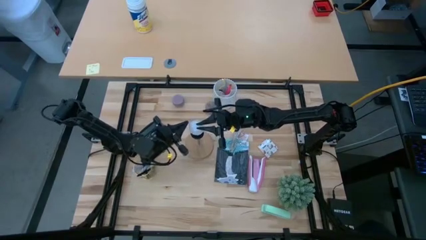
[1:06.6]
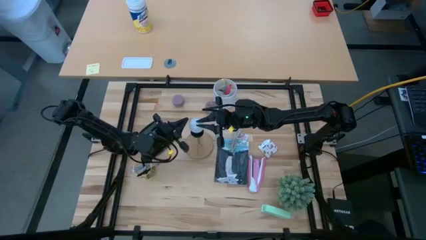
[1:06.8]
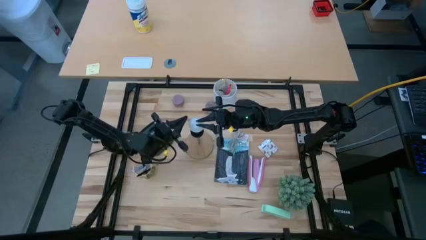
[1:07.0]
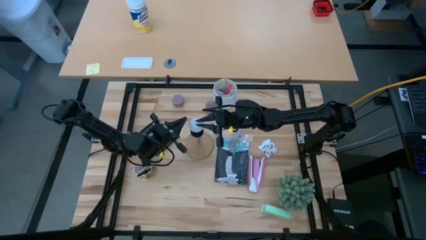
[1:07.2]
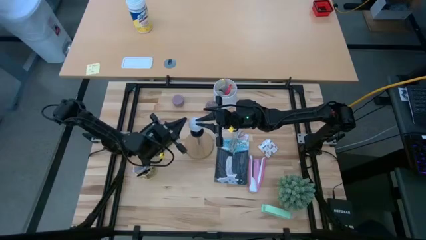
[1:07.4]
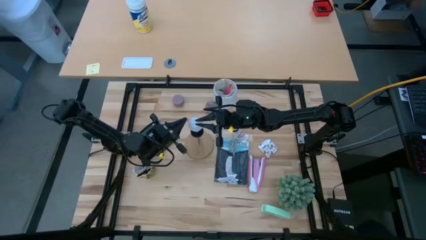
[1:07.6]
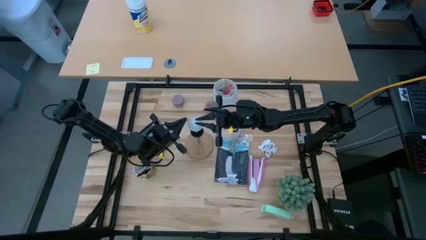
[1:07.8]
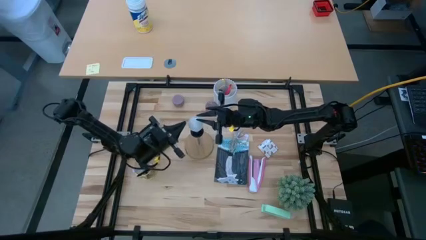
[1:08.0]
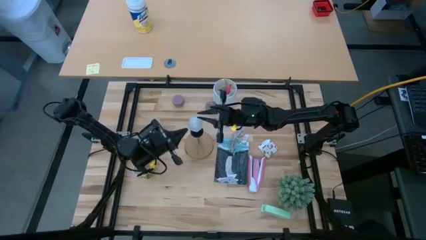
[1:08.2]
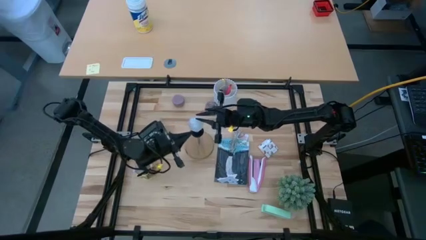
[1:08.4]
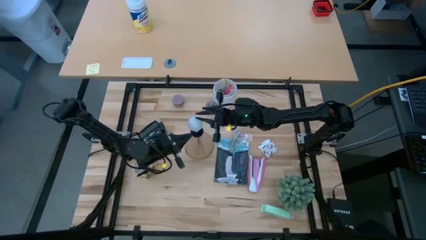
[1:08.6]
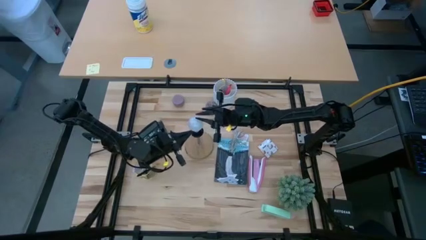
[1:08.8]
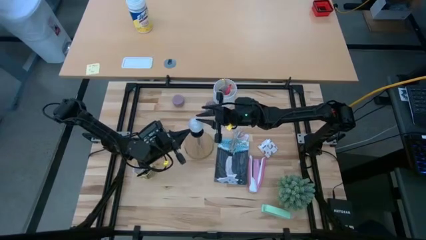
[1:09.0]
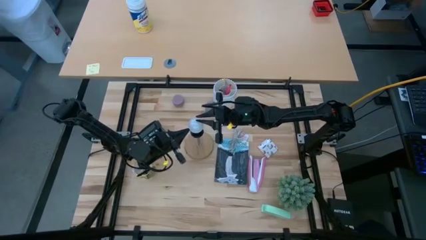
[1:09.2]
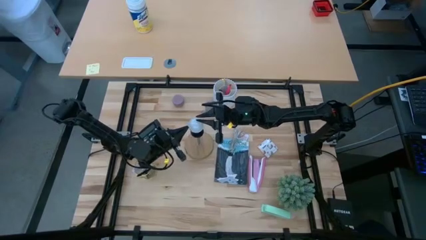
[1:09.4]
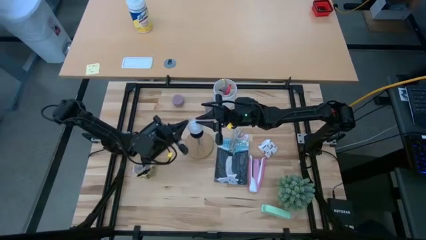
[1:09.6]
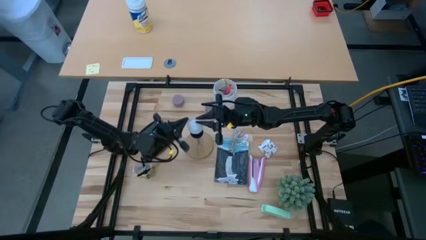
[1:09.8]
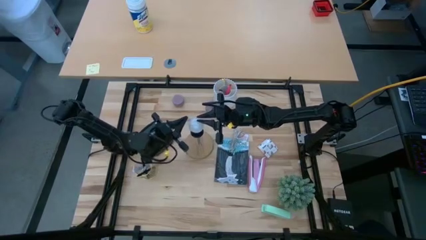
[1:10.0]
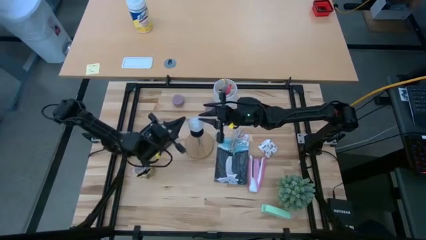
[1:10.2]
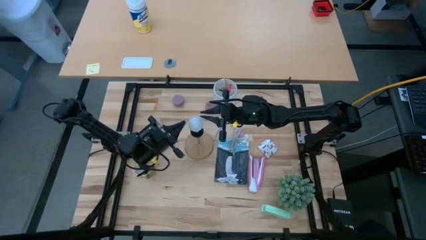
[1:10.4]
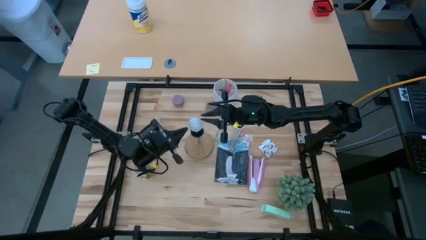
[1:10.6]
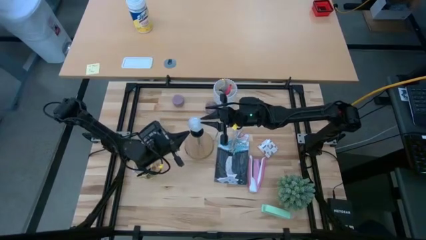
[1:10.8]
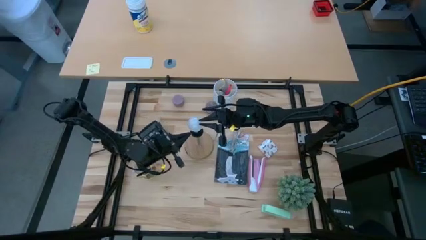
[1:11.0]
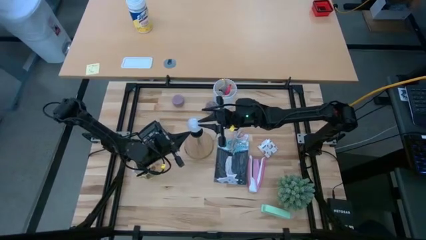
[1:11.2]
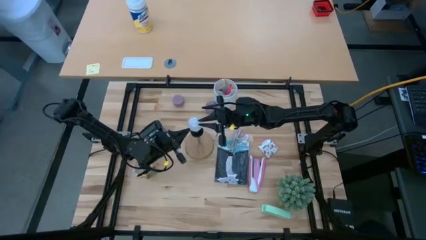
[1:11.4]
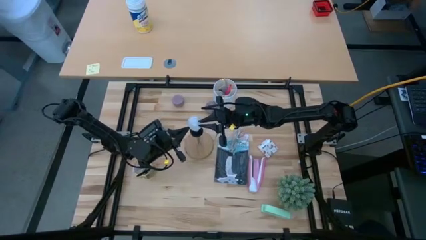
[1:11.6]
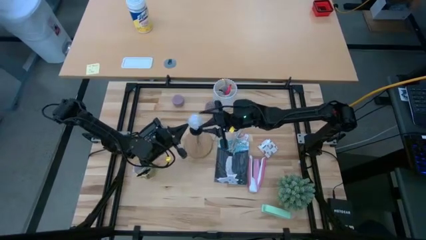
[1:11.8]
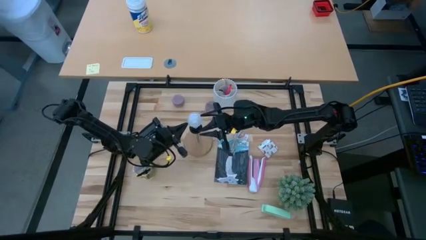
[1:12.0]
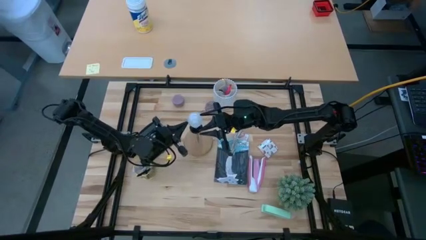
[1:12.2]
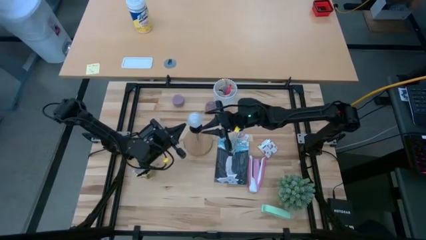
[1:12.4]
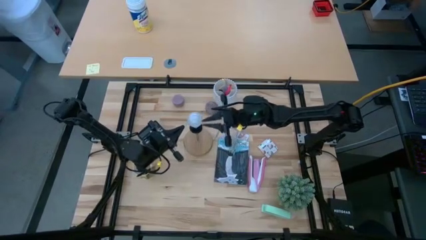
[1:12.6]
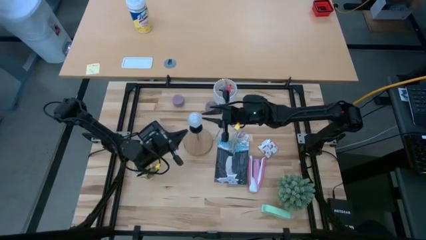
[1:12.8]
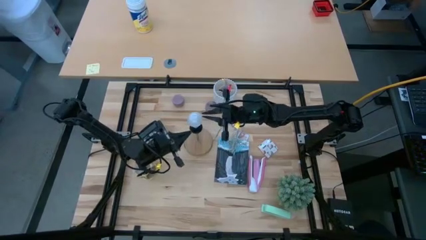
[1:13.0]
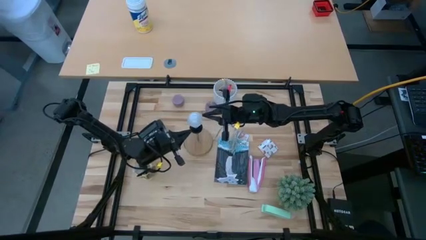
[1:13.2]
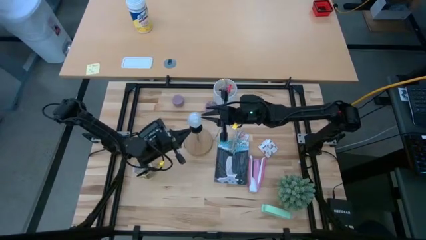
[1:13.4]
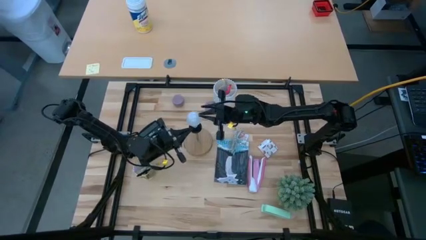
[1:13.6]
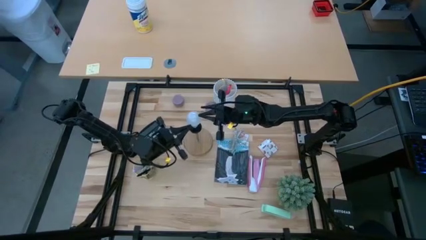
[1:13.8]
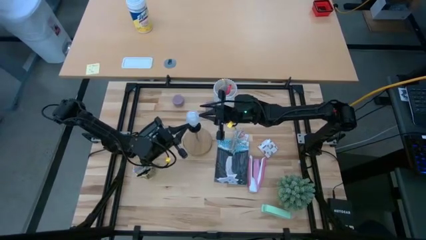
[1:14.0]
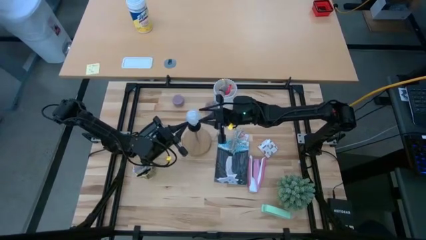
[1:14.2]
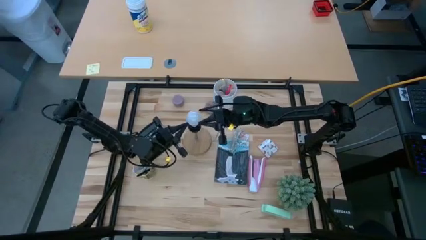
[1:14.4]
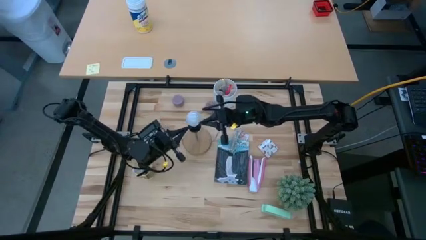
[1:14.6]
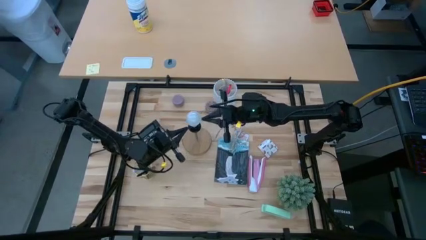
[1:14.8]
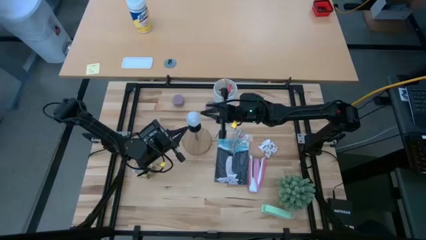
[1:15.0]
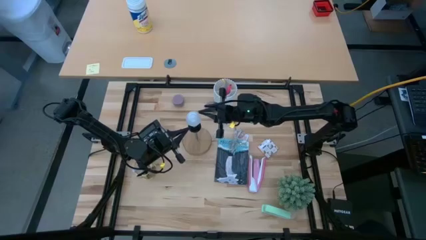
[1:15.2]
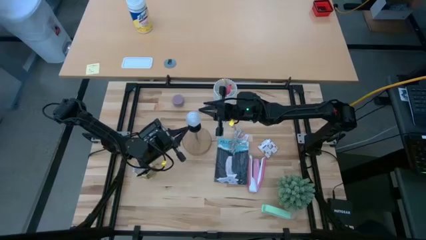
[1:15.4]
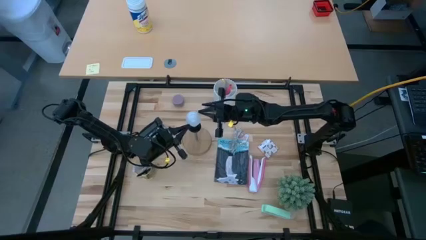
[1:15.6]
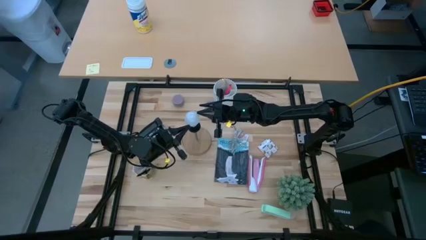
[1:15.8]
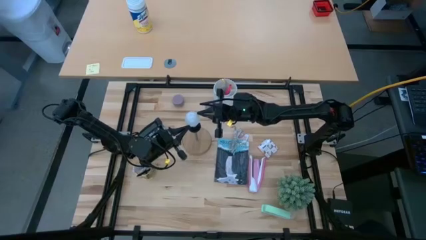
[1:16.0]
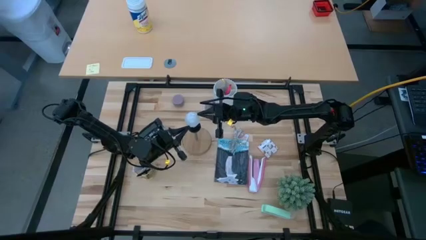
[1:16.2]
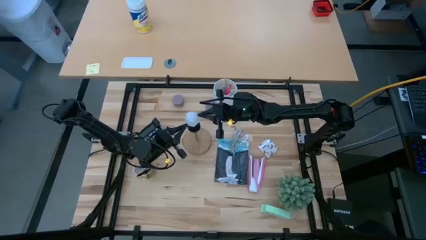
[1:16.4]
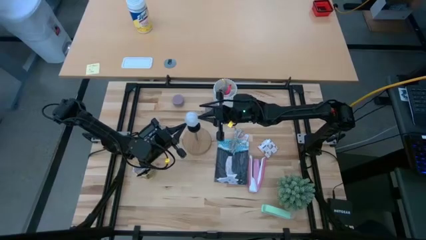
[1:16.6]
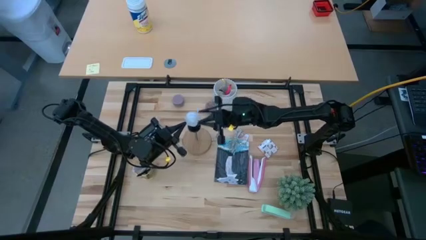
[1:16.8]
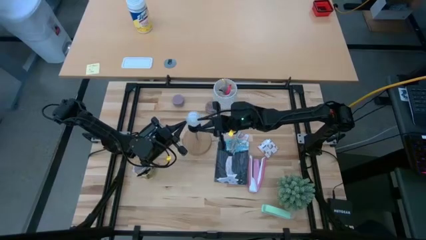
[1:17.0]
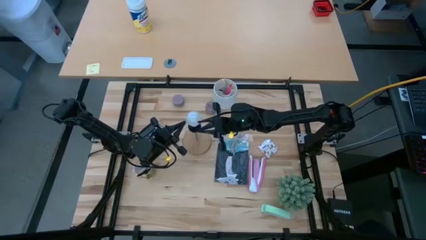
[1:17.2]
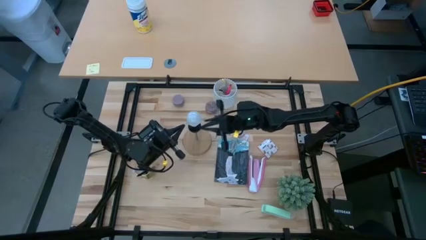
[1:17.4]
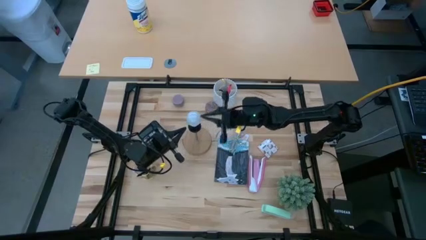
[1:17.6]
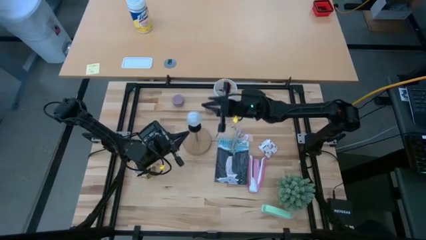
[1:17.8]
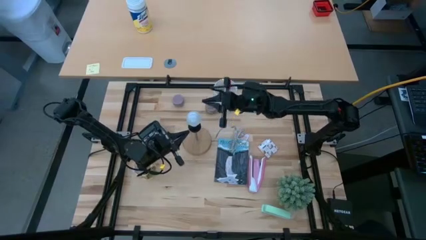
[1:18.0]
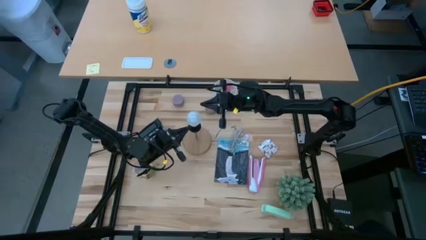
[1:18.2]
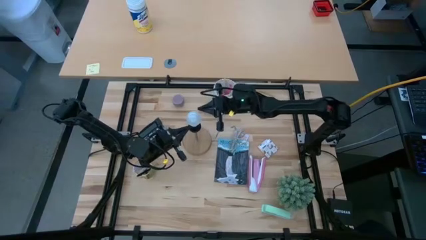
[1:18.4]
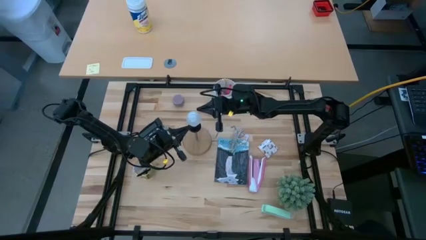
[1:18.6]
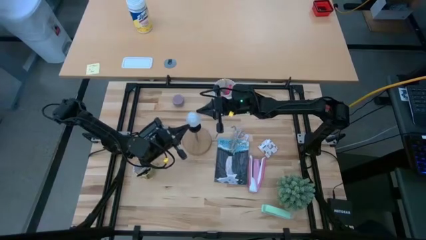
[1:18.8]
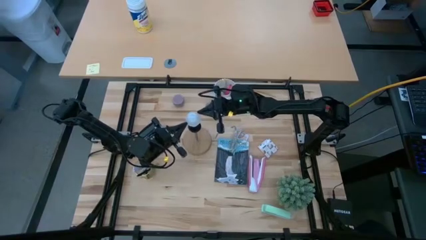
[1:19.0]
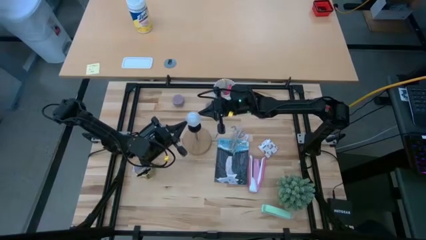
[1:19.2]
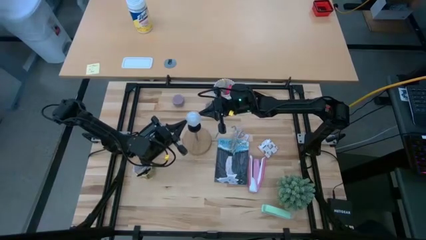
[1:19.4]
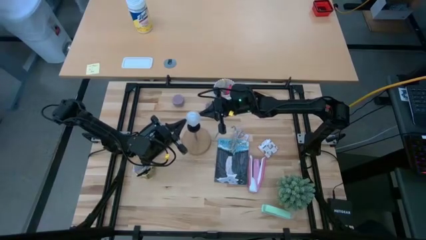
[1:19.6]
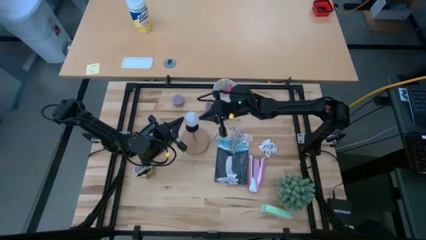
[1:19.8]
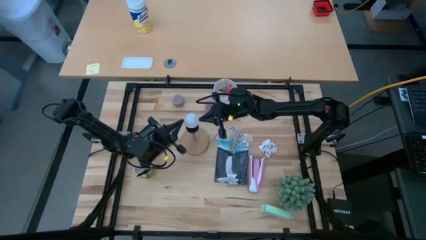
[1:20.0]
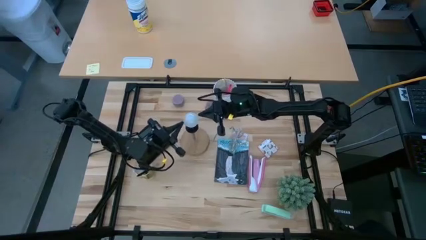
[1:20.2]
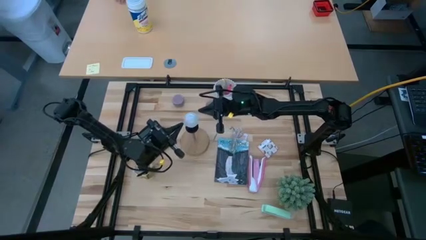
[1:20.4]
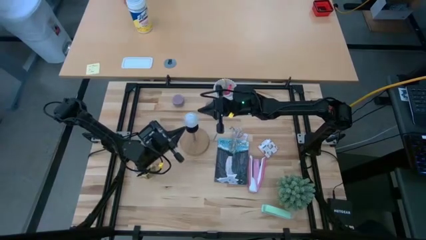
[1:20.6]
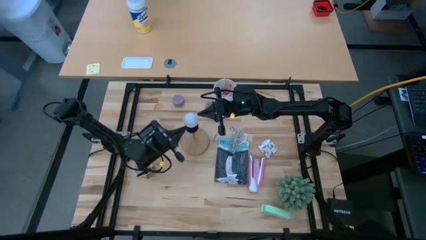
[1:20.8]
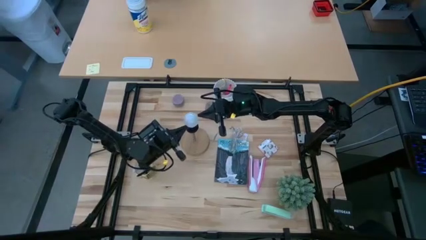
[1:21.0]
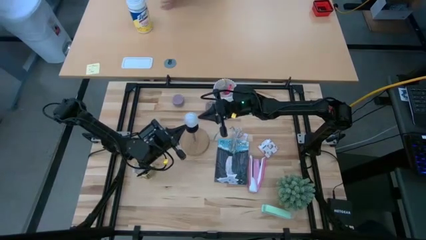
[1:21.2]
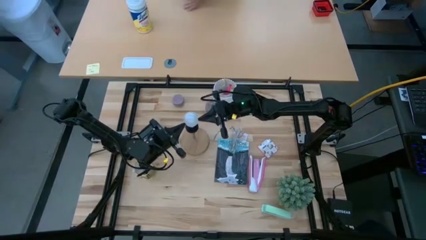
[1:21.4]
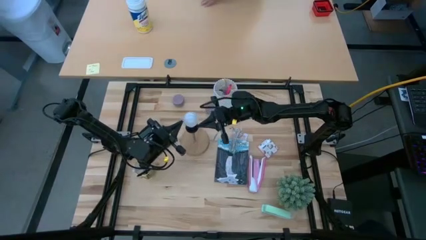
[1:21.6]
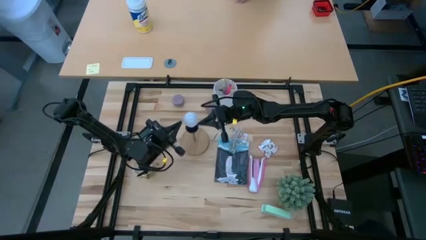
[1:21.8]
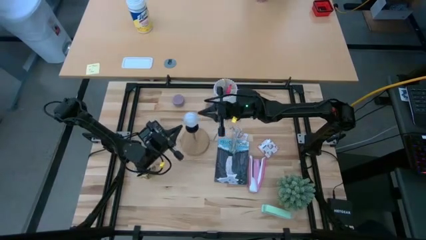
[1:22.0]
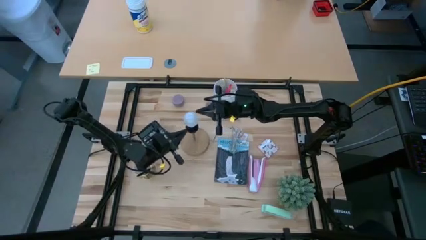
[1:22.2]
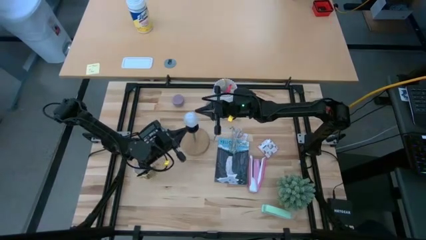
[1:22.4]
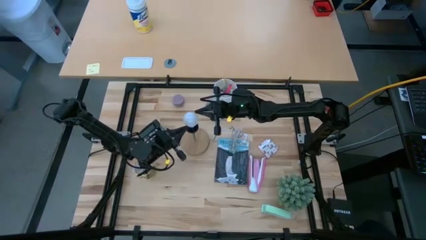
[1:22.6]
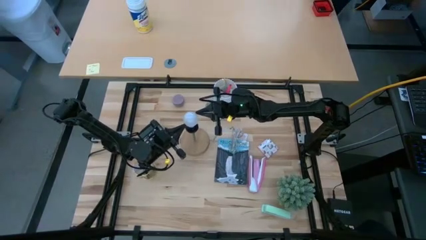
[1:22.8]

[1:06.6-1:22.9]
Task: Screw lightbulb
Insert the lightbulb into the lamp
